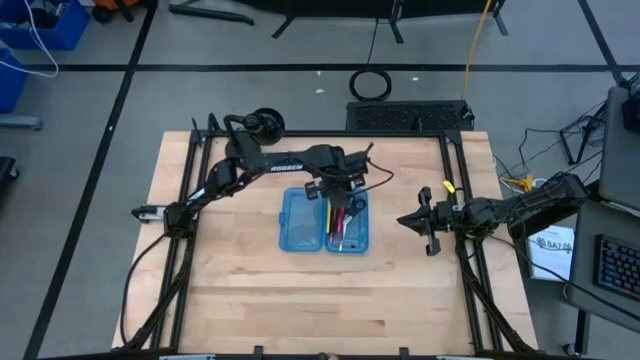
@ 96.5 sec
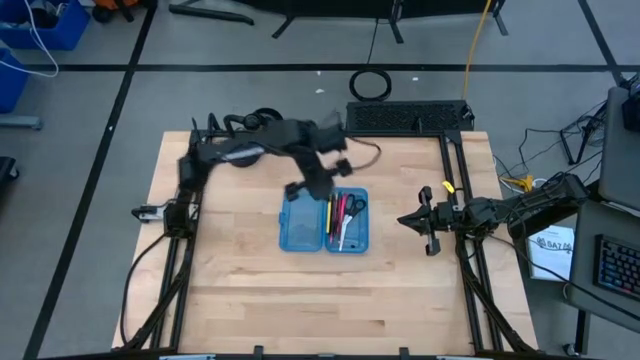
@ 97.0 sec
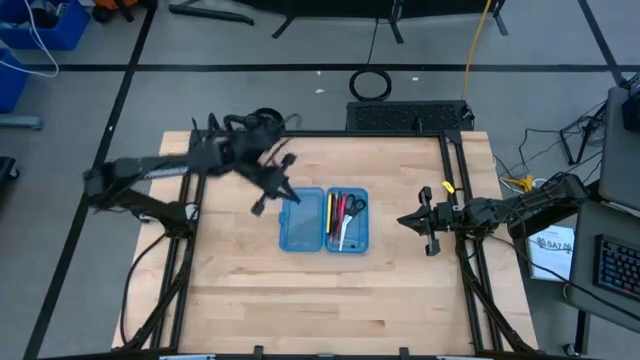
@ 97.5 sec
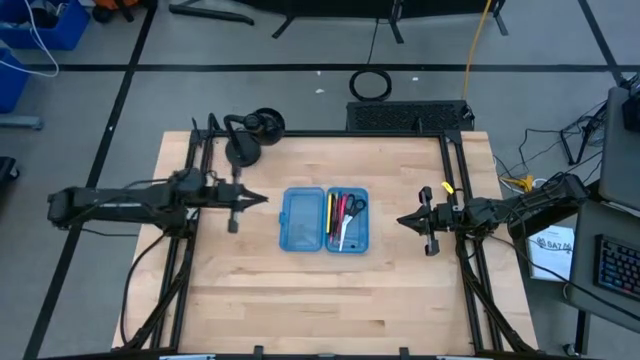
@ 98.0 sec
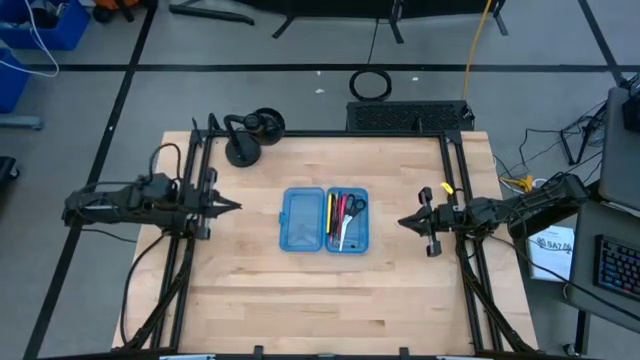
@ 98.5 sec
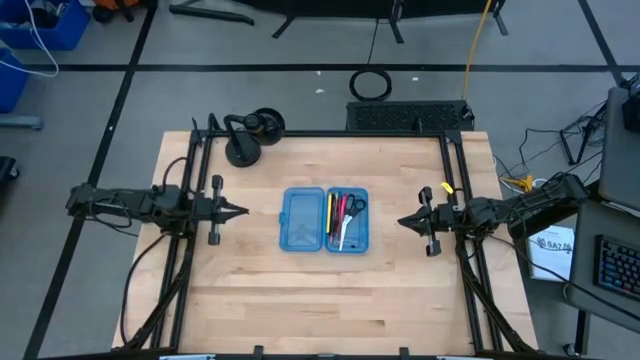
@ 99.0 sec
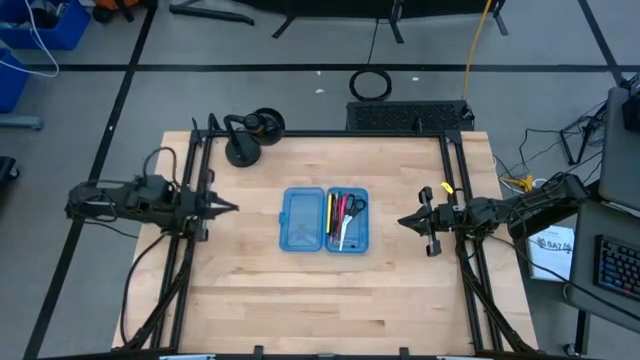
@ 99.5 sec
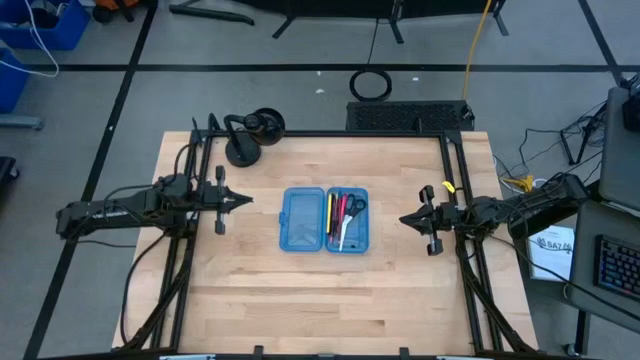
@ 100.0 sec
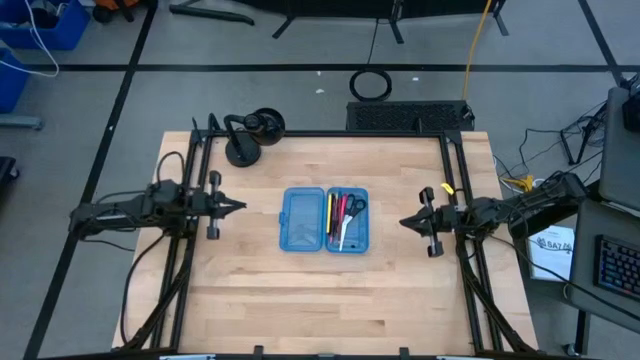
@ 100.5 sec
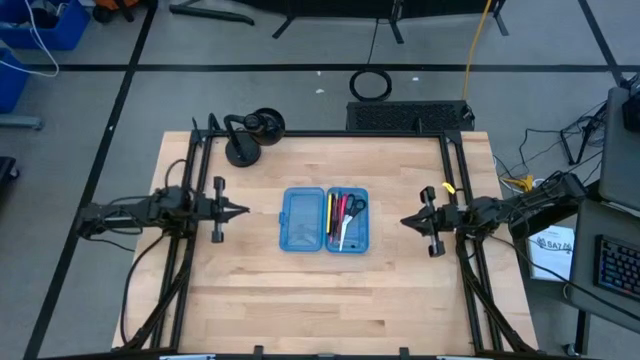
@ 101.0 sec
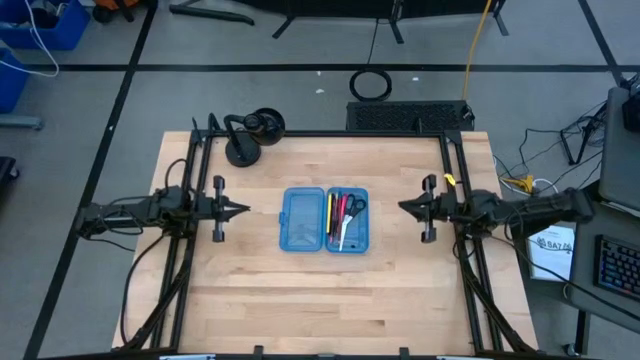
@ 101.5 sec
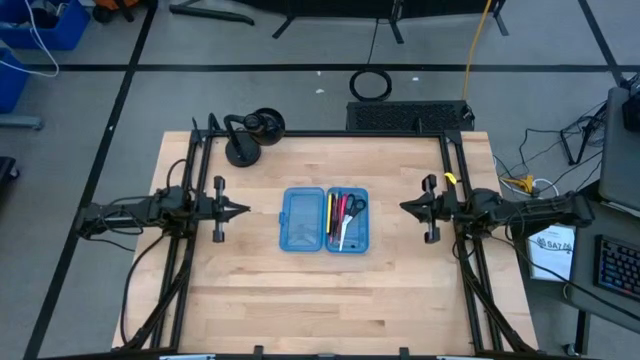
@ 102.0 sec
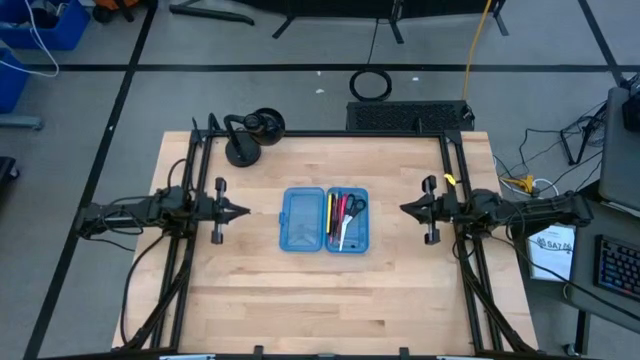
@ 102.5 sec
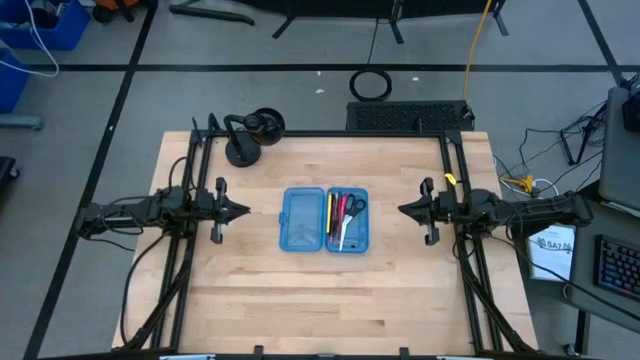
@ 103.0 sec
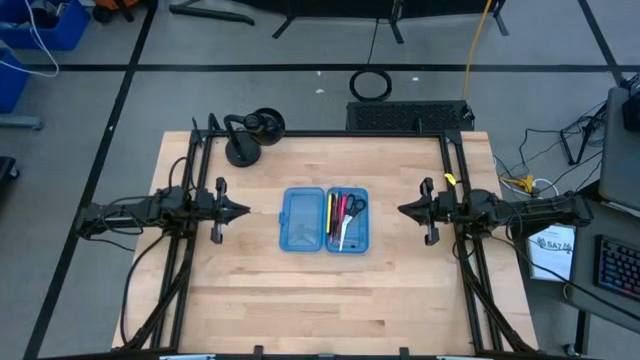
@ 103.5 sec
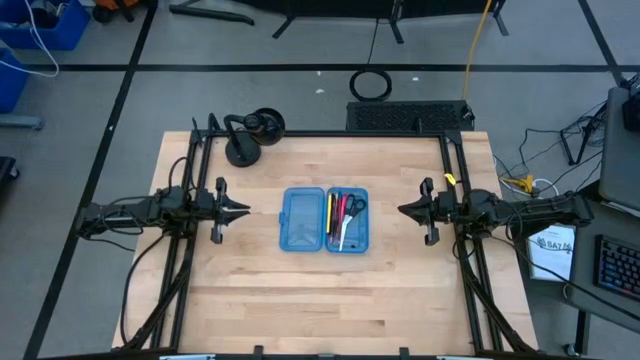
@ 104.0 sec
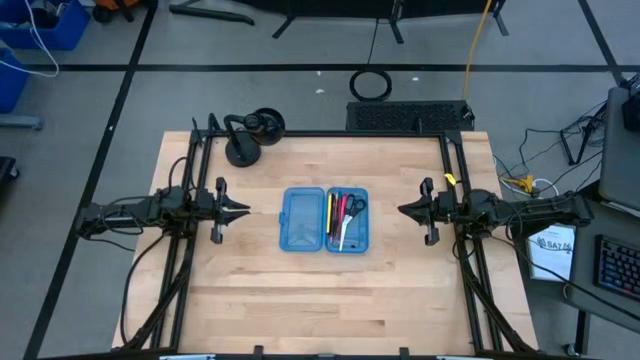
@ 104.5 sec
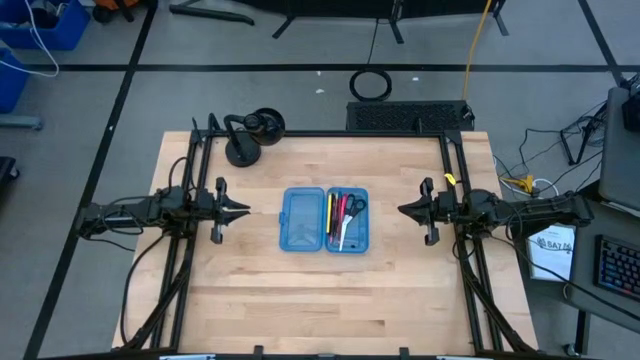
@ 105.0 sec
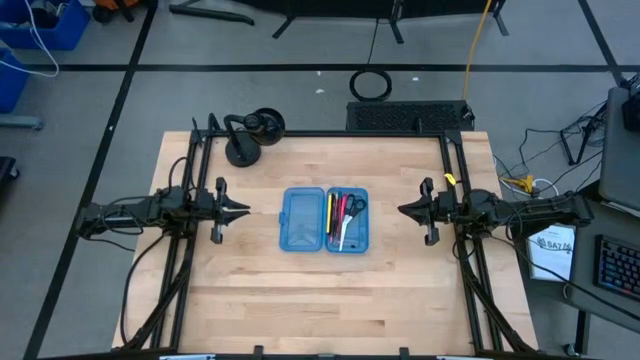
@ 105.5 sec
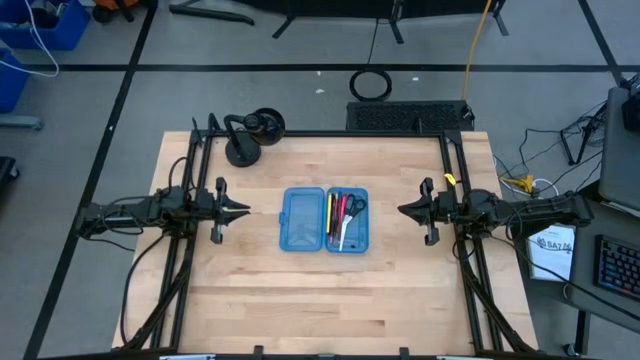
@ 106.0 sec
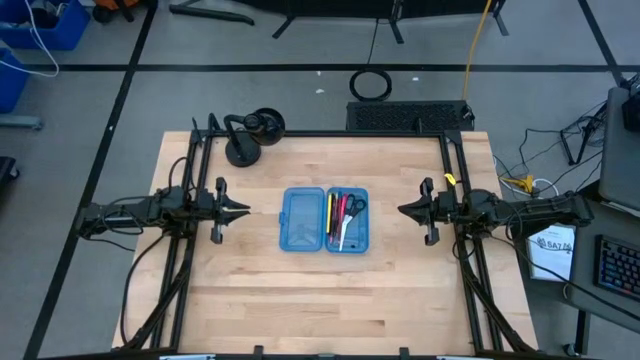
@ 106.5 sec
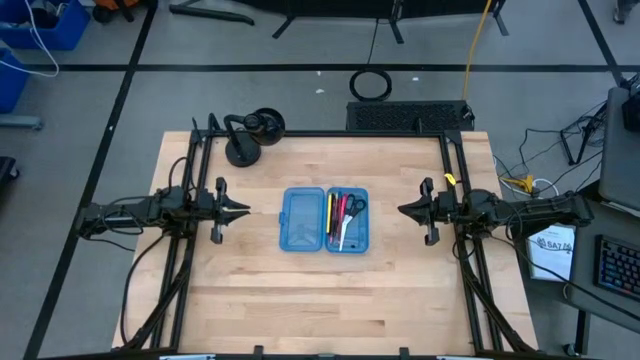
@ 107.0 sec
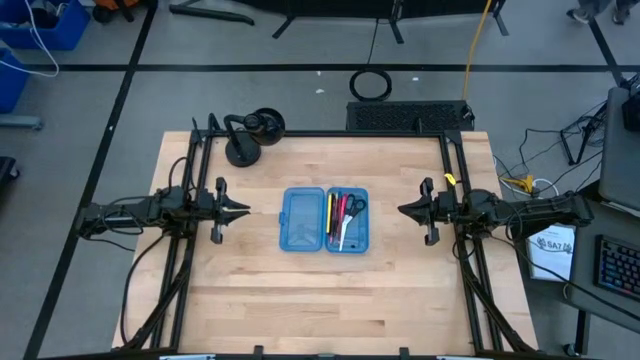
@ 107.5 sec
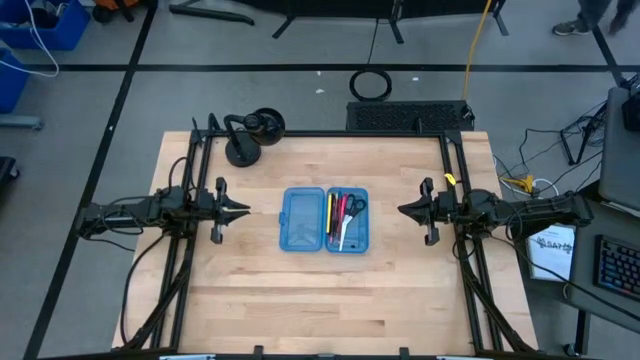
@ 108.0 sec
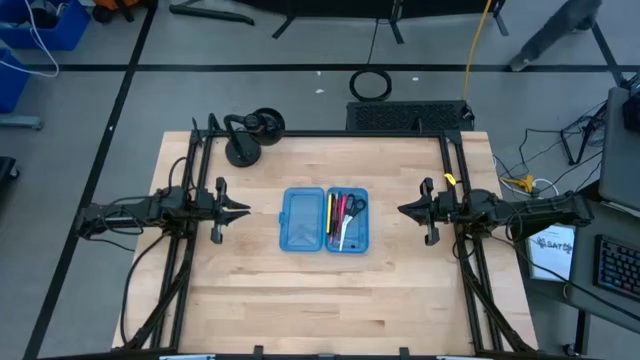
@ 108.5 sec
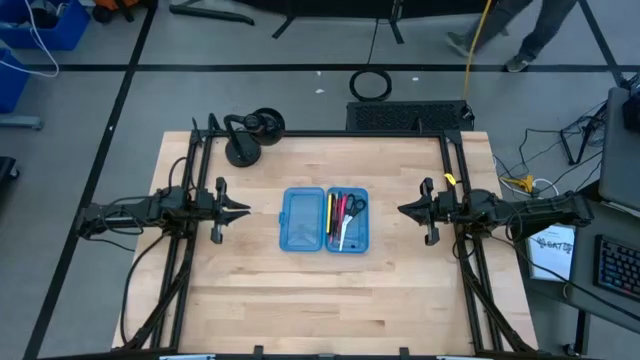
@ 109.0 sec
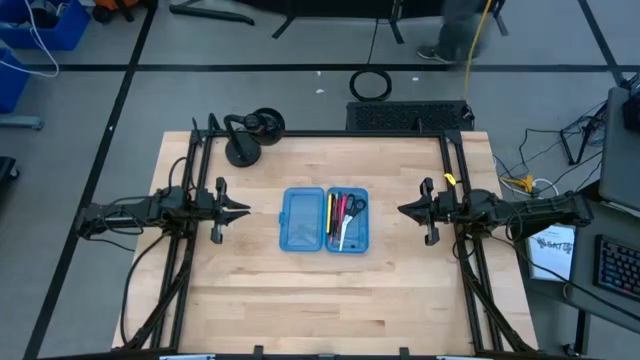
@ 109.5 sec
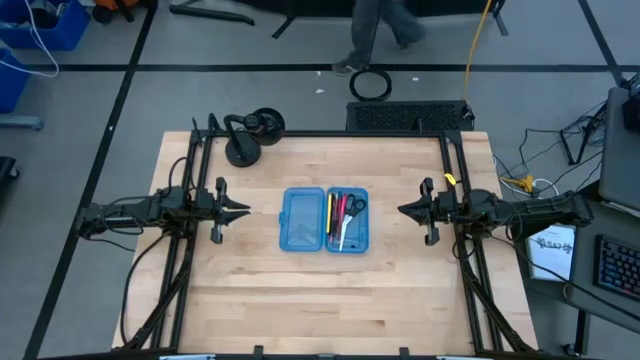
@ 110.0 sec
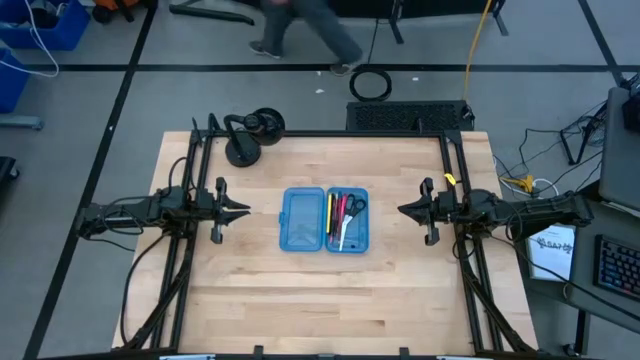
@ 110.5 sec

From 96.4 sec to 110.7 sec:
Task: Pick & place school supplies into a supply box
Return to Home Position

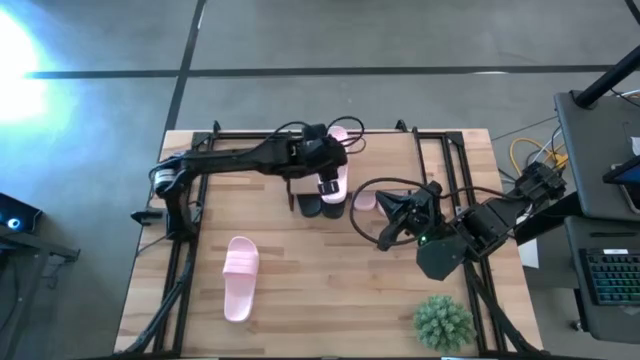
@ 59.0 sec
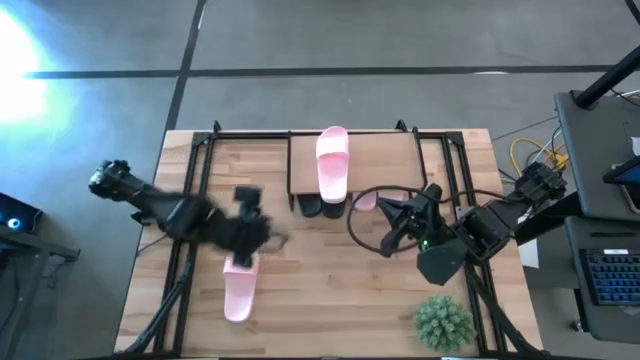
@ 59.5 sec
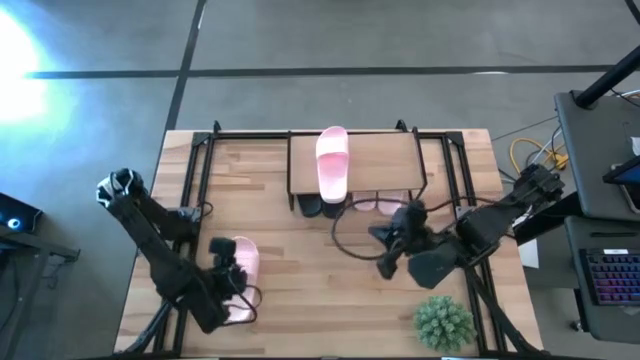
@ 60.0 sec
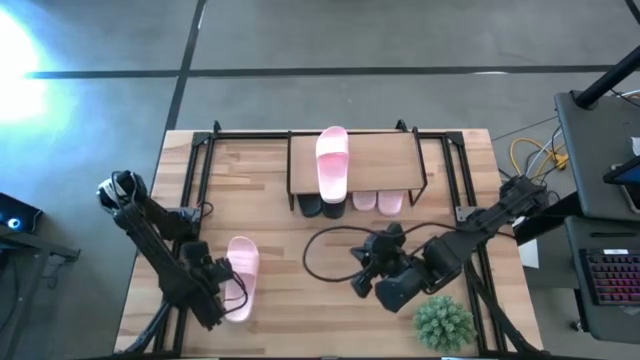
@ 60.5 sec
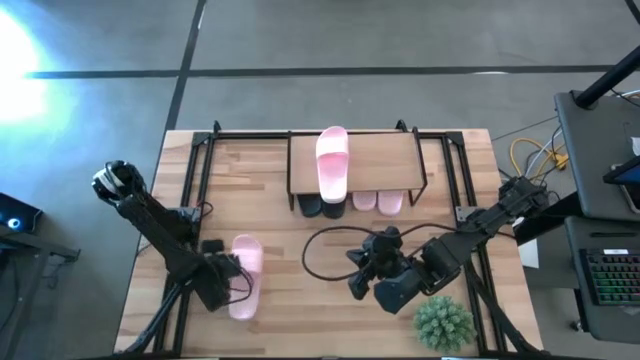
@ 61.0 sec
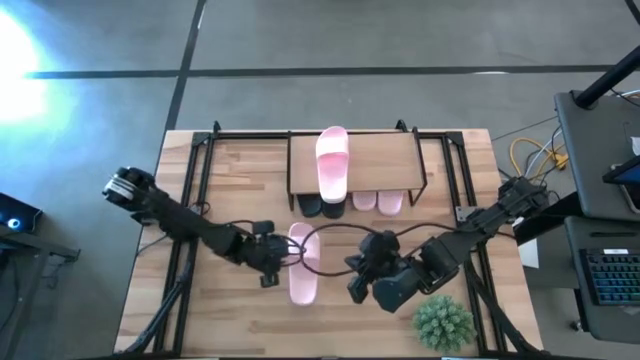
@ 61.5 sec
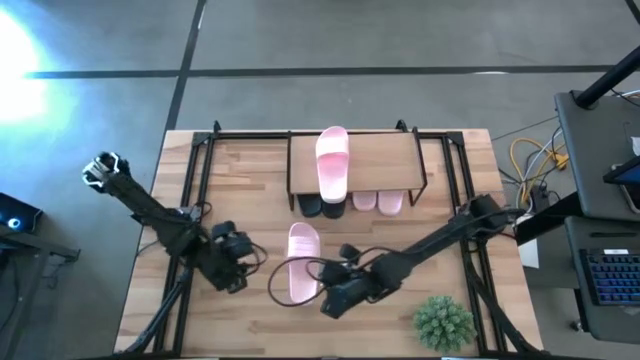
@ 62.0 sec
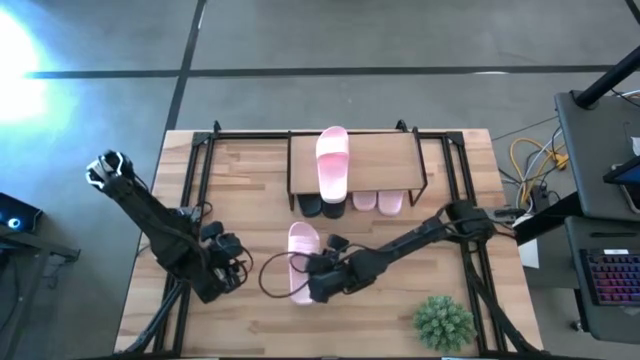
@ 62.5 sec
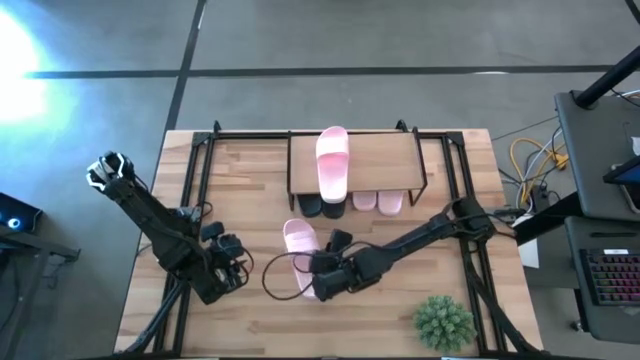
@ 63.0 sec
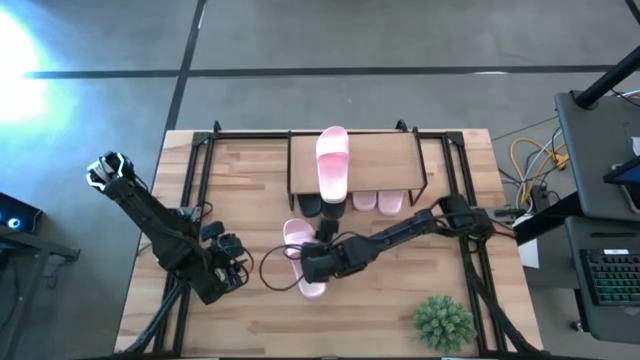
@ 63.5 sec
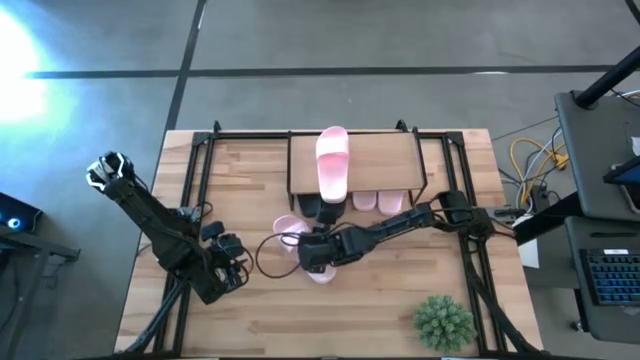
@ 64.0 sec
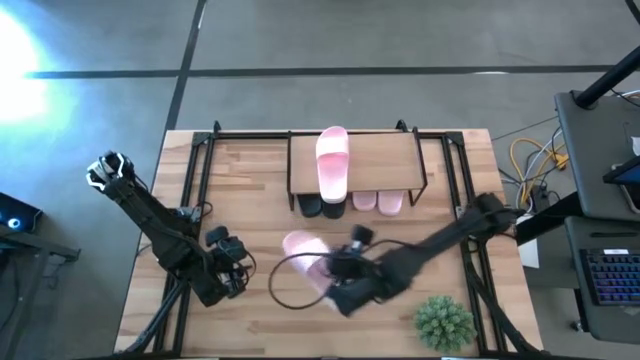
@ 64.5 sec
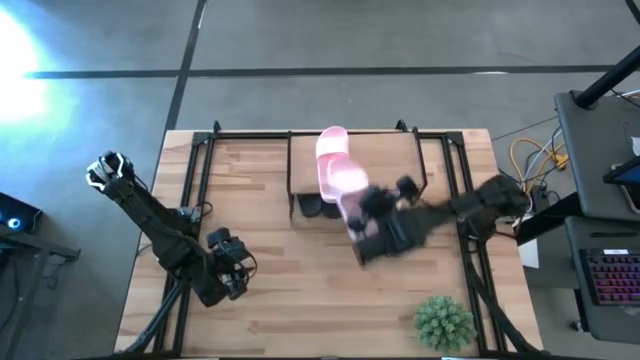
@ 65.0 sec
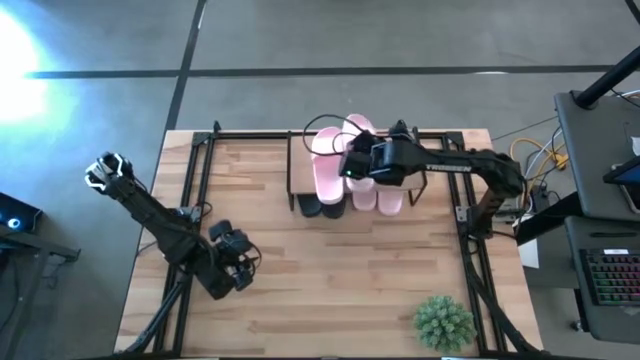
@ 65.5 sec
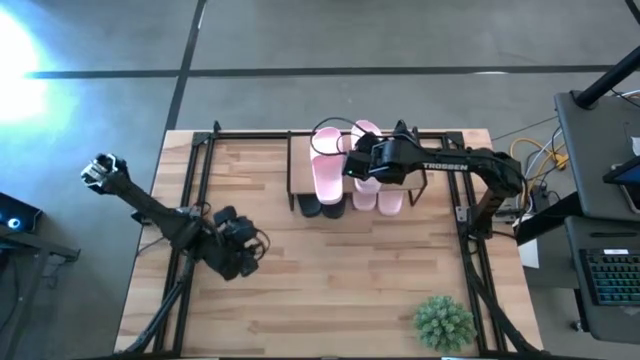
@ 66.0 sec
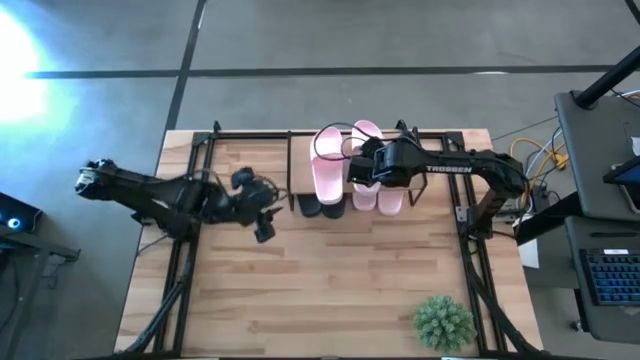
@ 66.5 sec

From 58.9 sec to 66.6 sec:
Task: Pick and place slides into the shelf
Put the pink slide on the shelf
